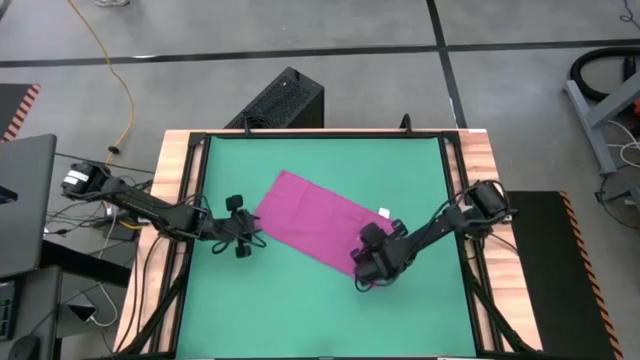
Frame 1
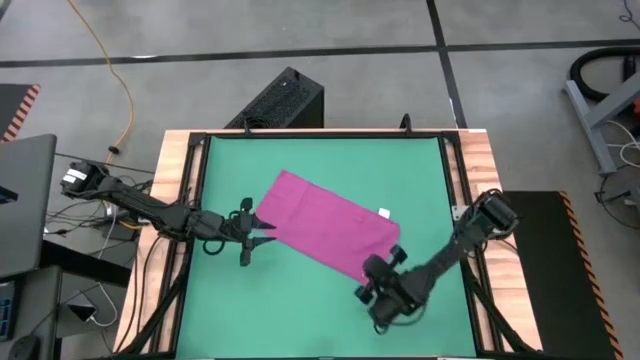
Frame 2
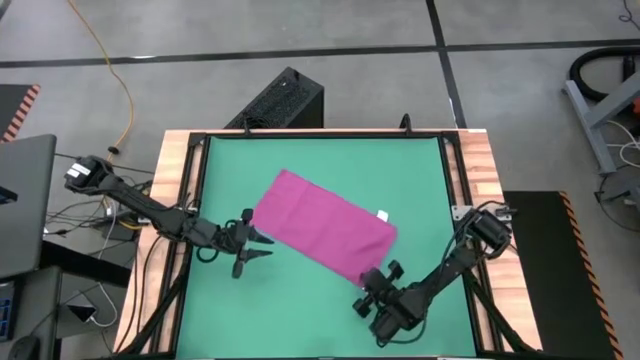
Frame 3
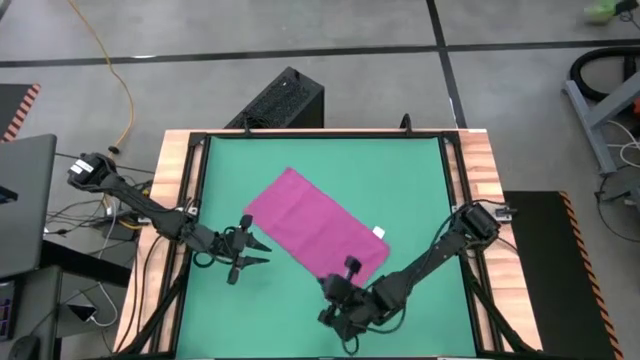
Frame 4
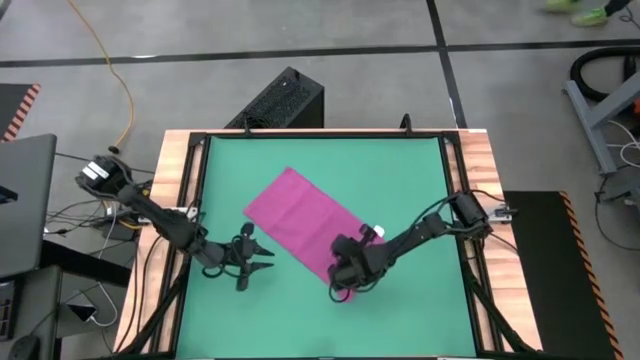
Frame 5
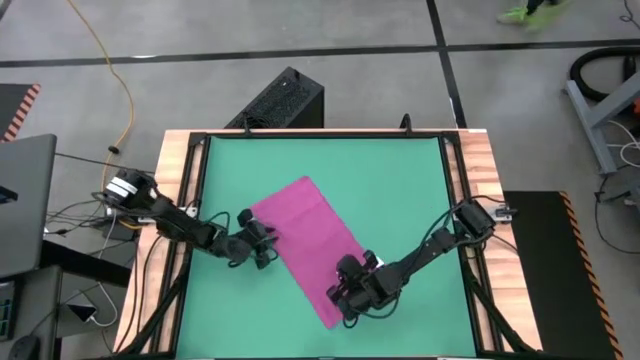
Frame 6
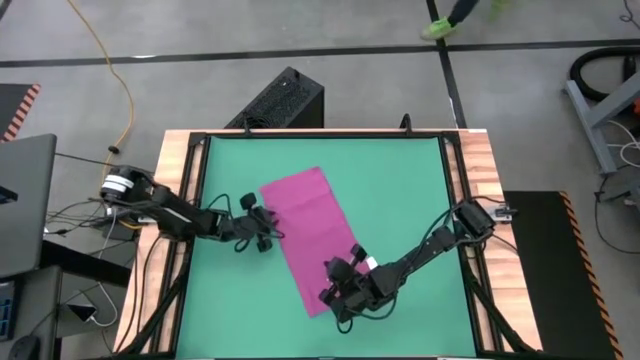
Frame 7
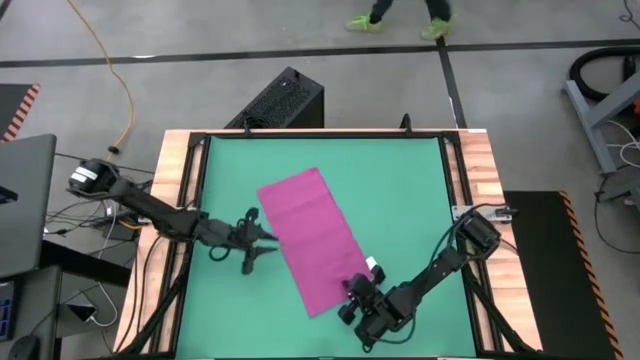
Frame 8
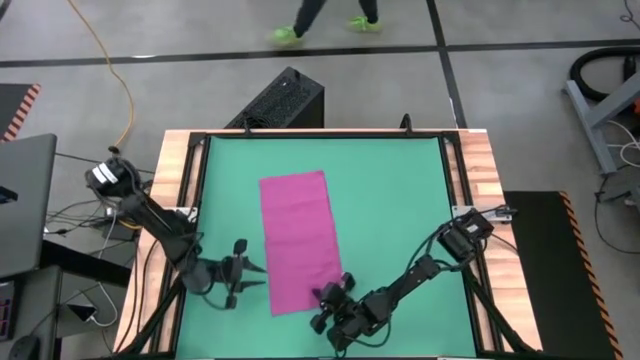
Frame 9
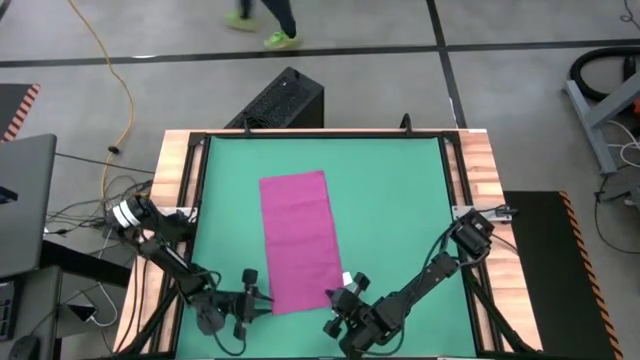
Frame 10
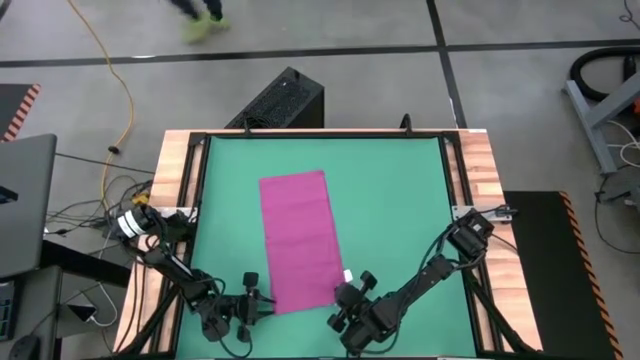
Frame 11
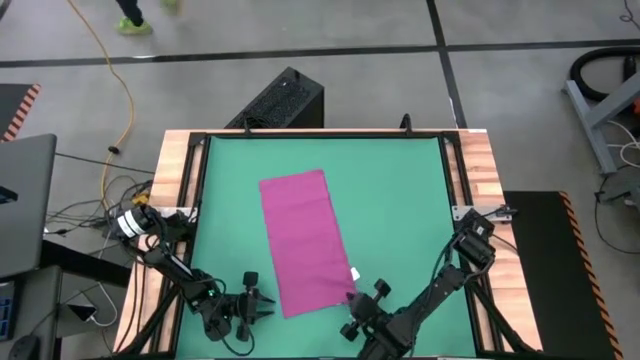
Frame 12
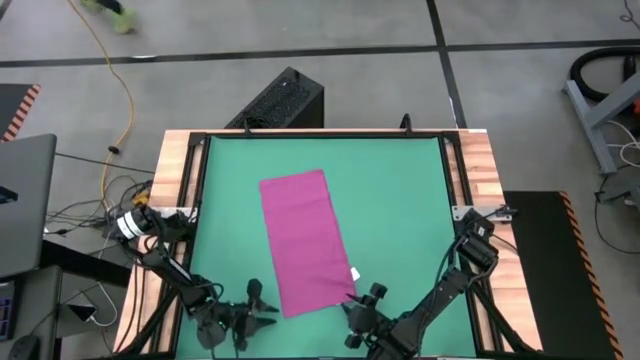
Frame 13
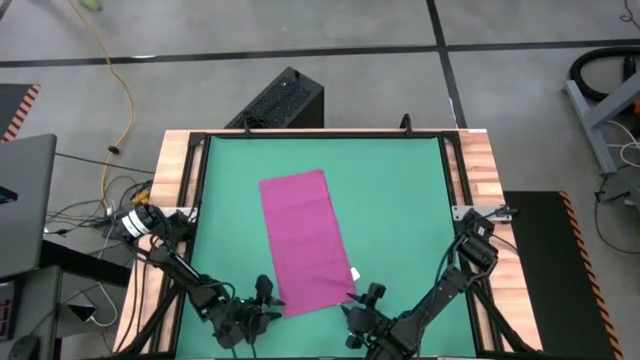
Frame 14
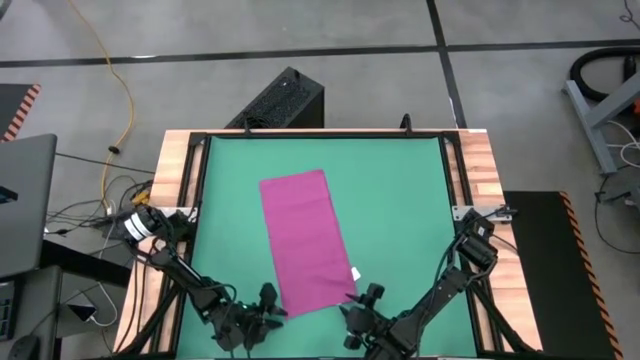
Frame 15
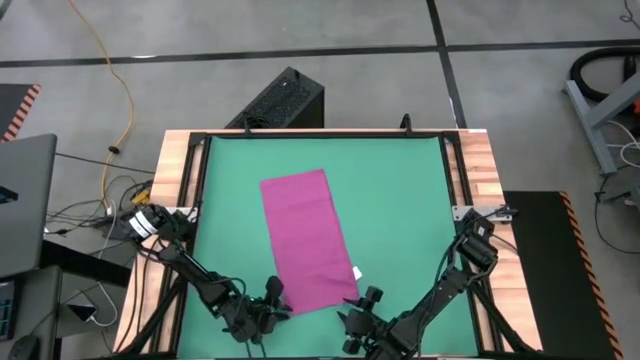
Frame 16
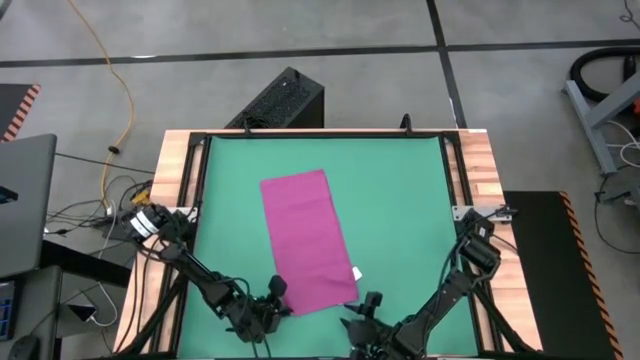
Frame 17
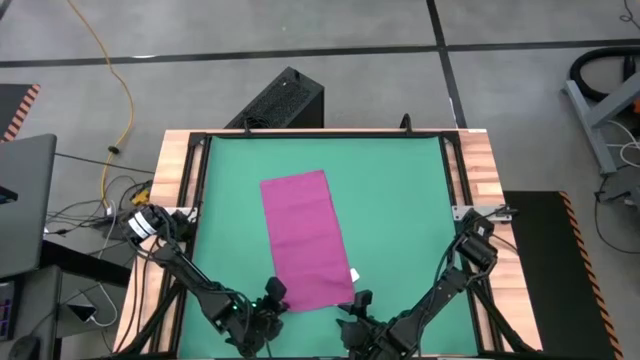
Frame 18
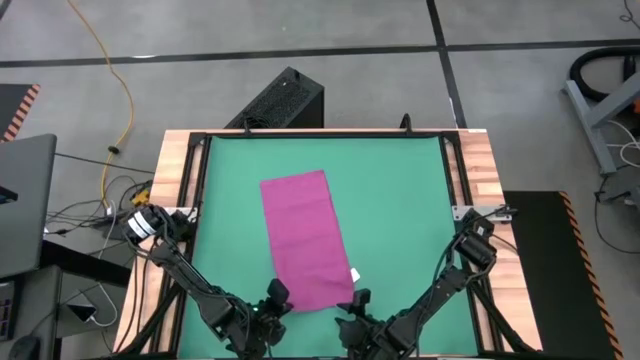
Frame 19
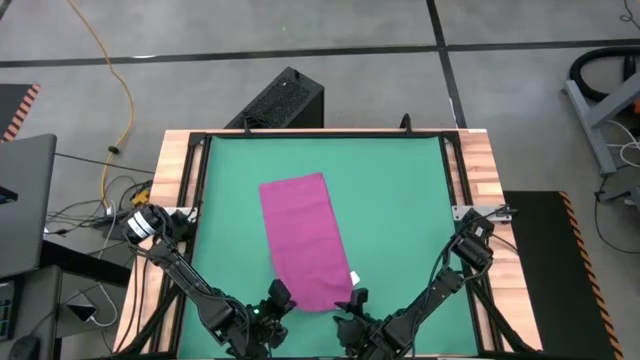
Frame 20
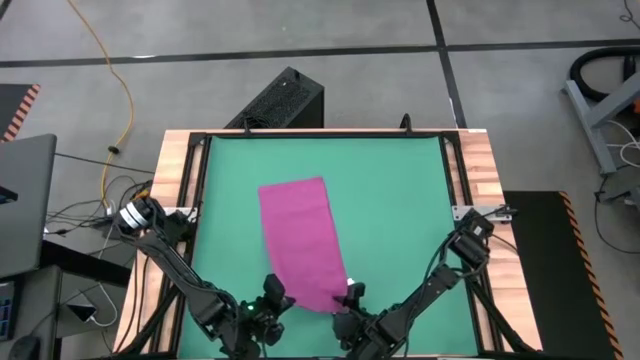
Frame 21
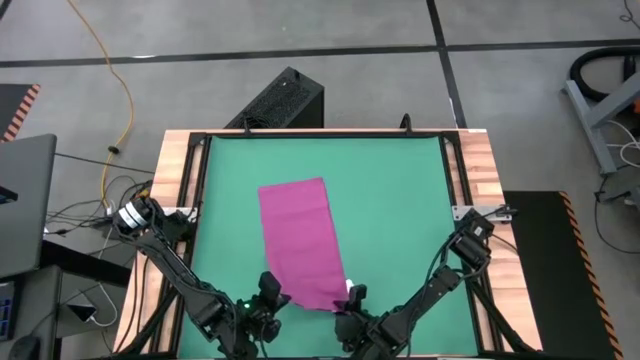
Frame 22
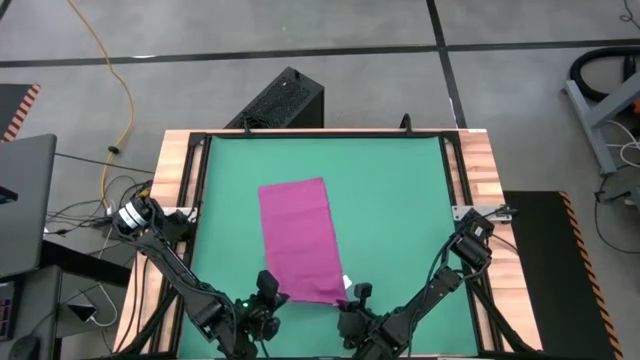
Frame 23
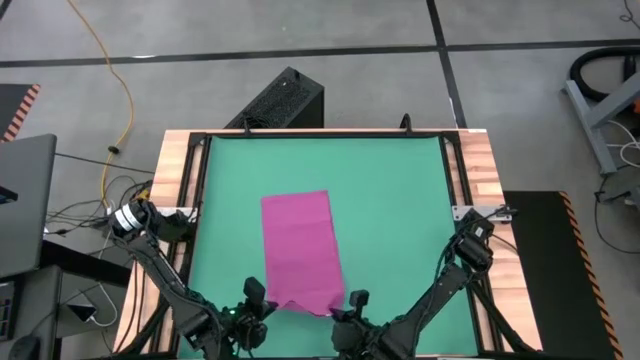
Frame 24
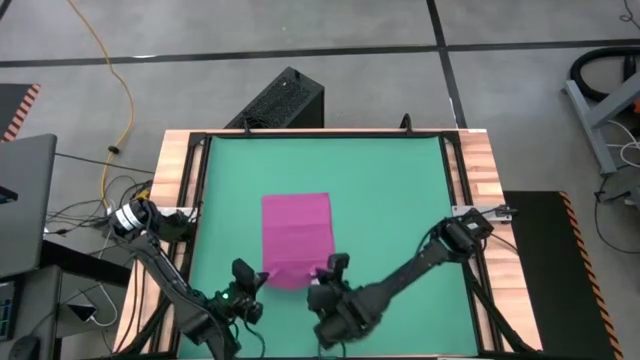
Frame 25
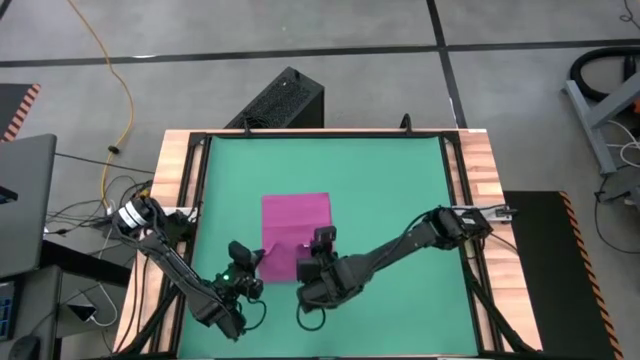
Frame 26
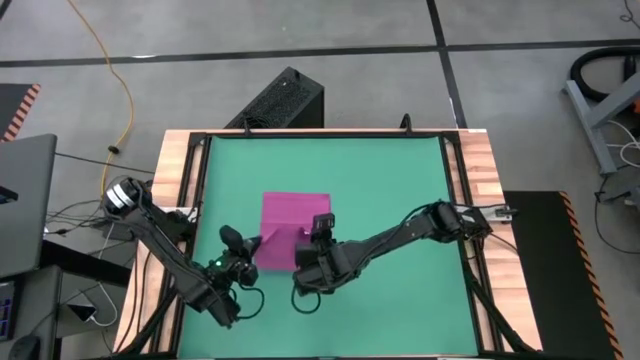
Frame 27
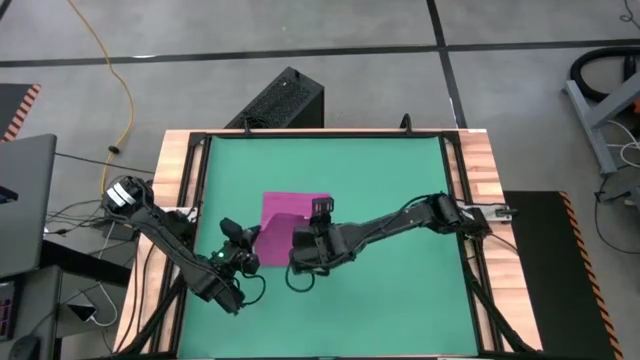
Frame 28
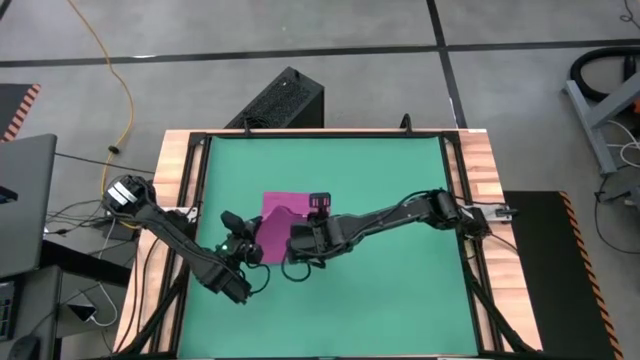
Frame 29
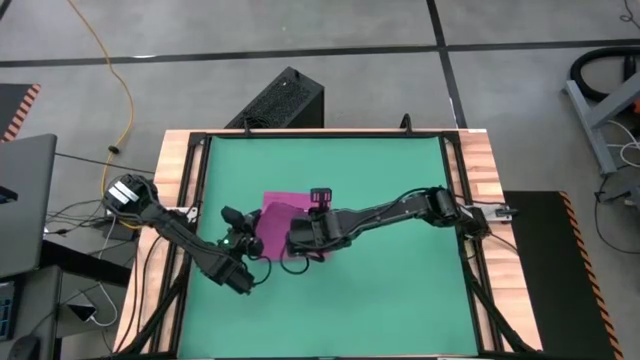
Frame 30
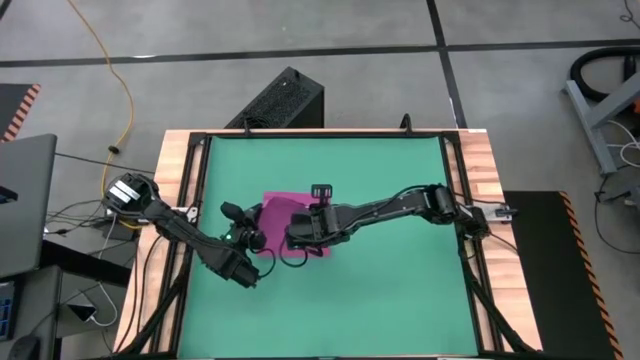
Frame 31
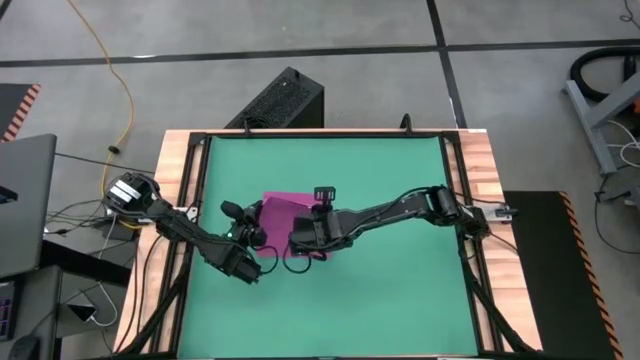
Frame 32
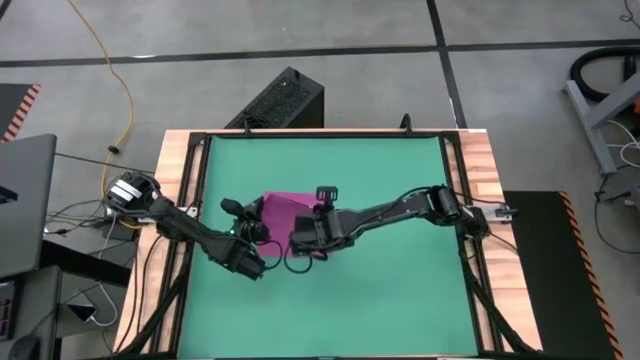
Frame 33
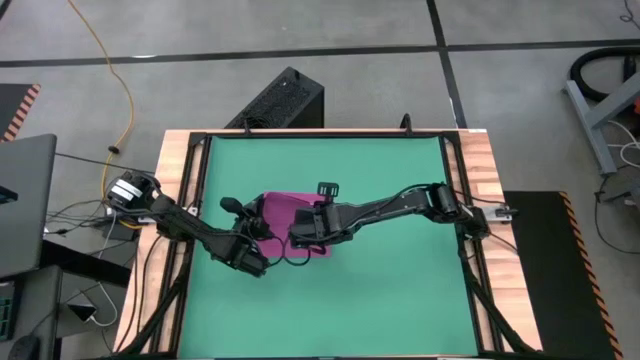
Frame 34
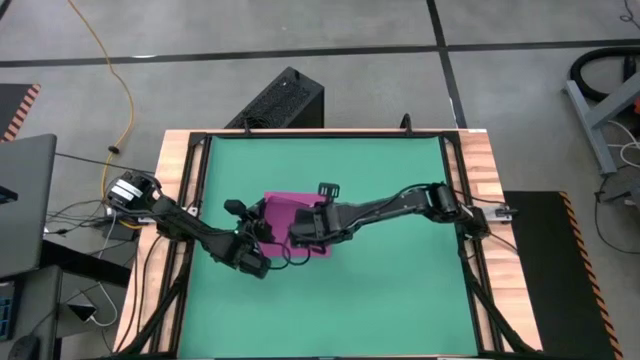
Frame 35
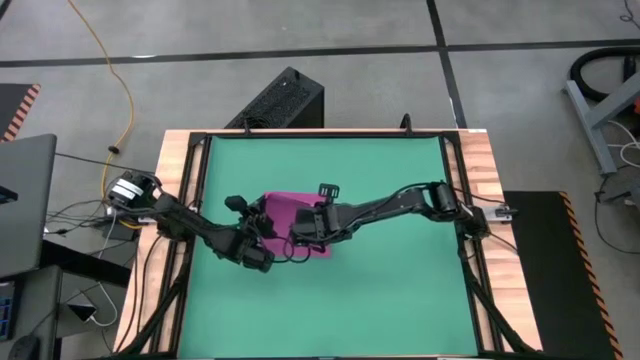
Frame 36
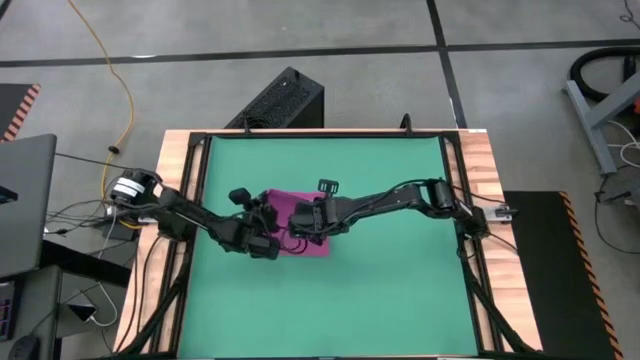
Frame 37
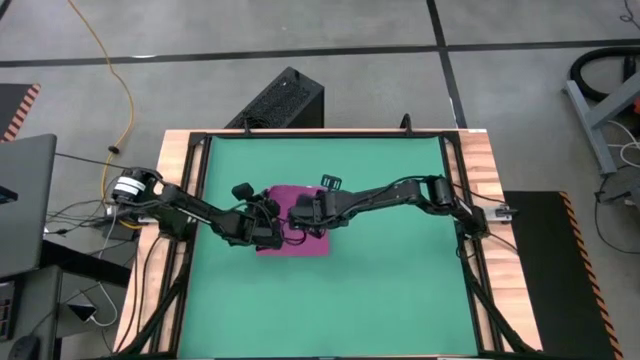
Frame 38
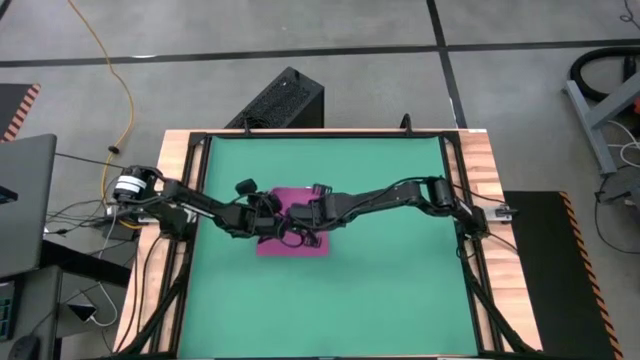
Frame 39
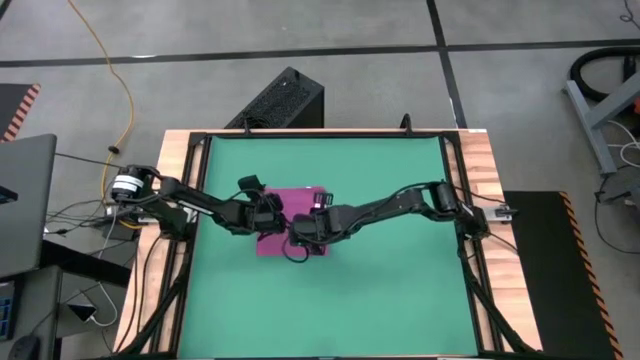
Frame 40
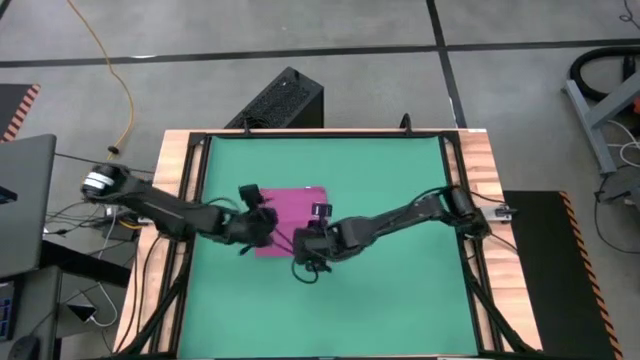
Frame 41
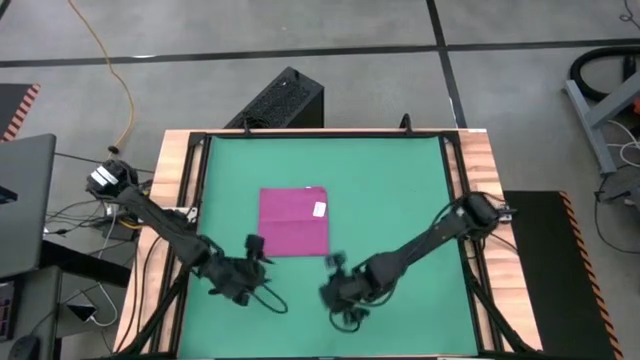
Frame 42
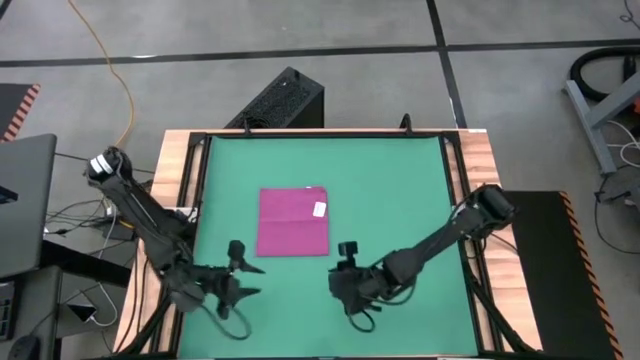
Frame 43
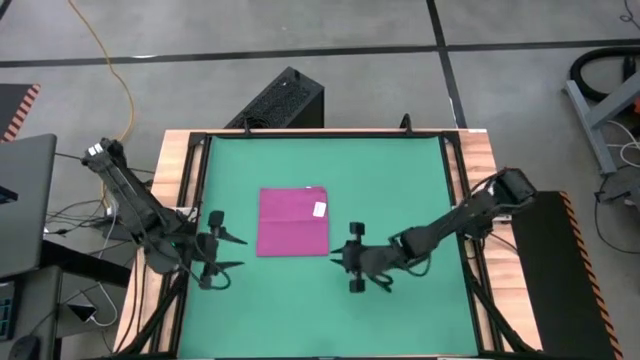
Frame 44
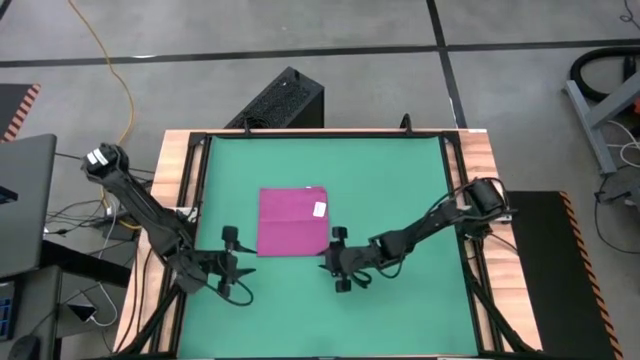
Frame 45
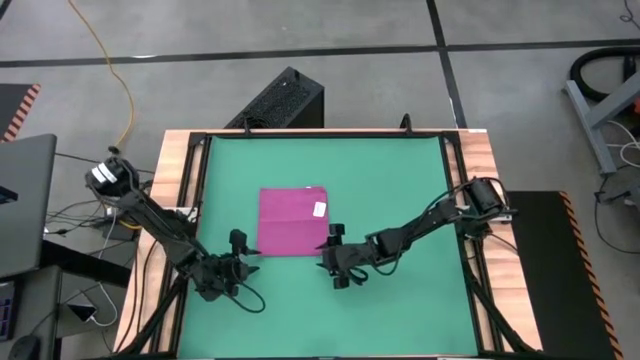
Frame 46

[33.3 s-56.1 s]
Task: Roll towel into tight, uniform cylinder
Roll the pink towel
